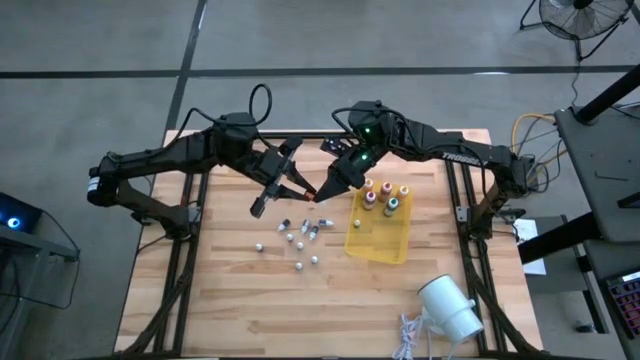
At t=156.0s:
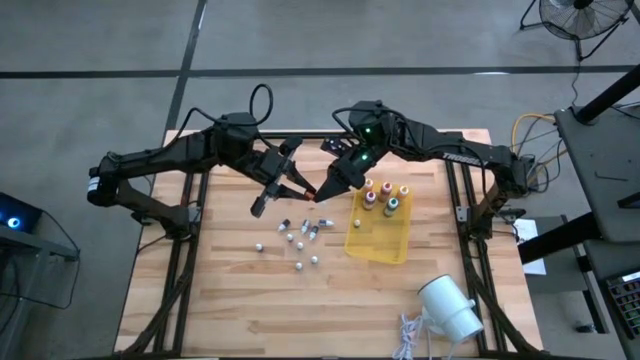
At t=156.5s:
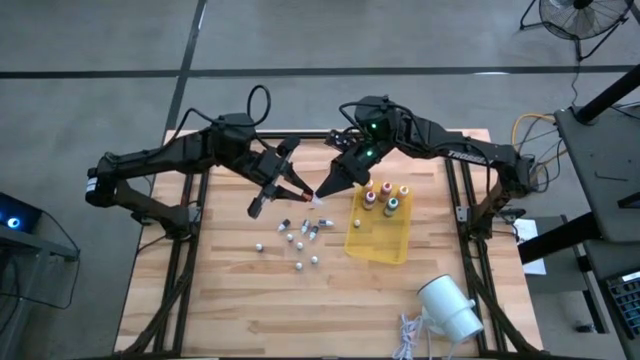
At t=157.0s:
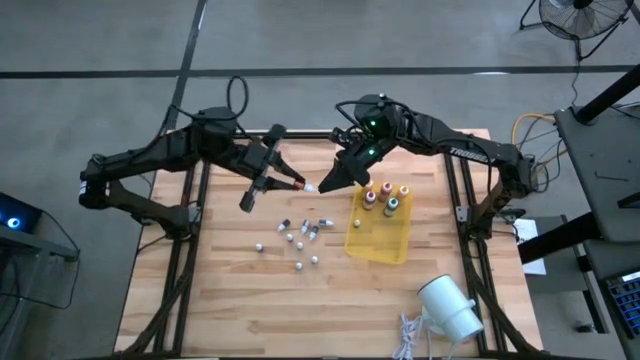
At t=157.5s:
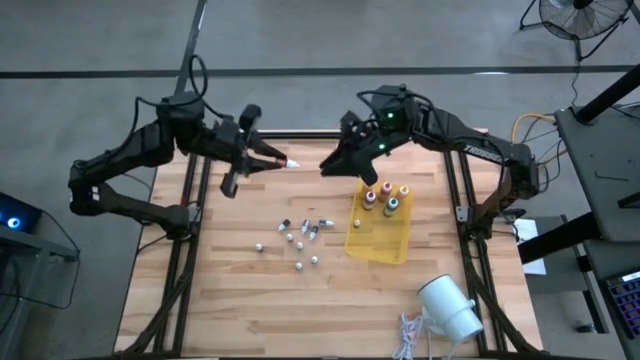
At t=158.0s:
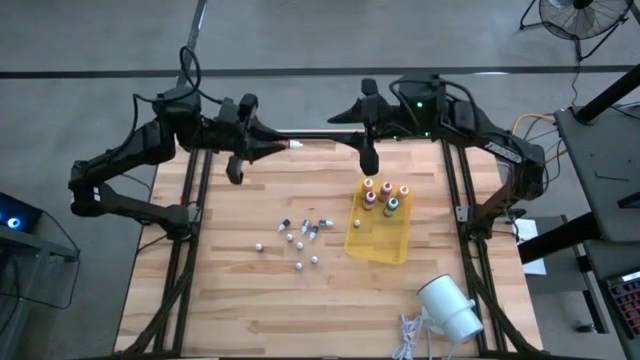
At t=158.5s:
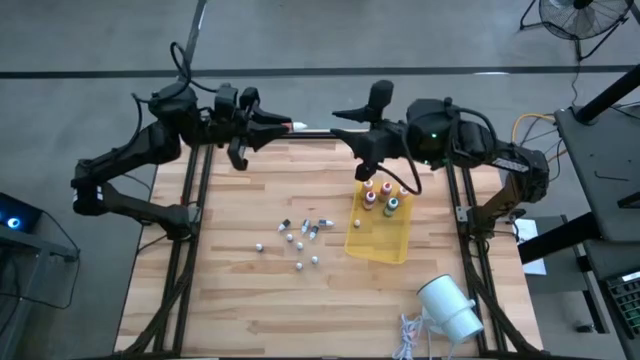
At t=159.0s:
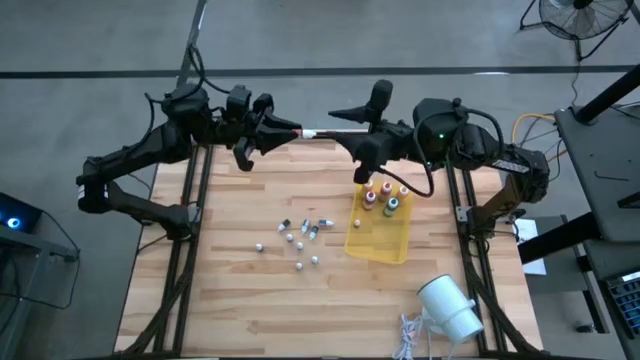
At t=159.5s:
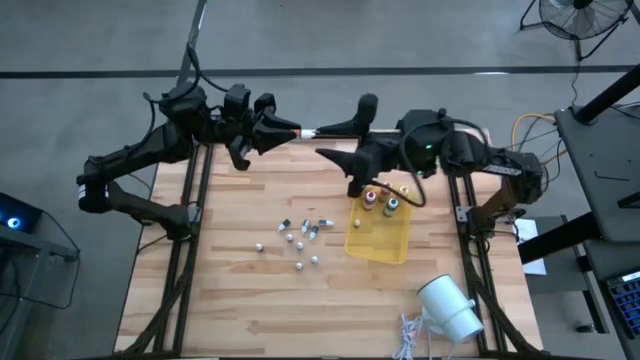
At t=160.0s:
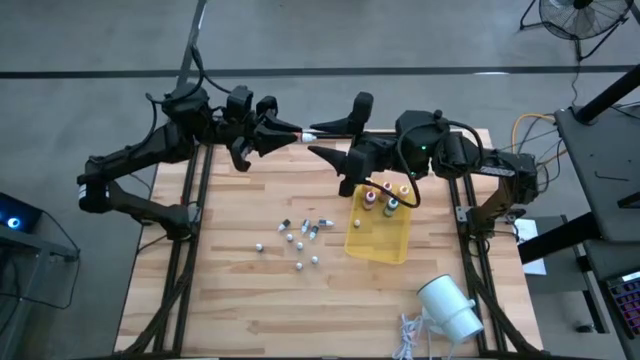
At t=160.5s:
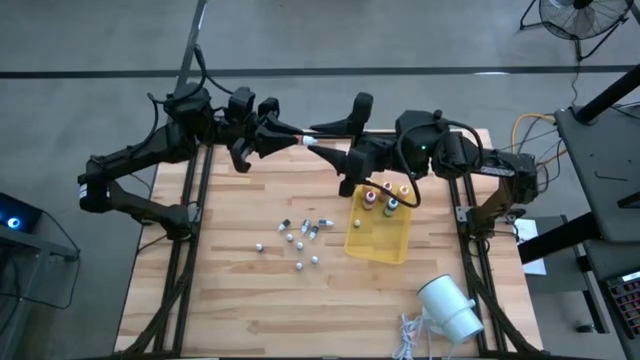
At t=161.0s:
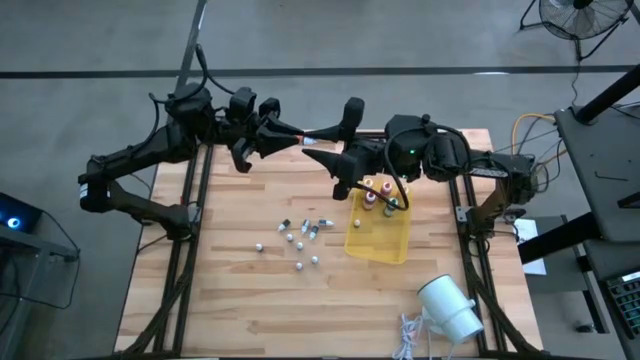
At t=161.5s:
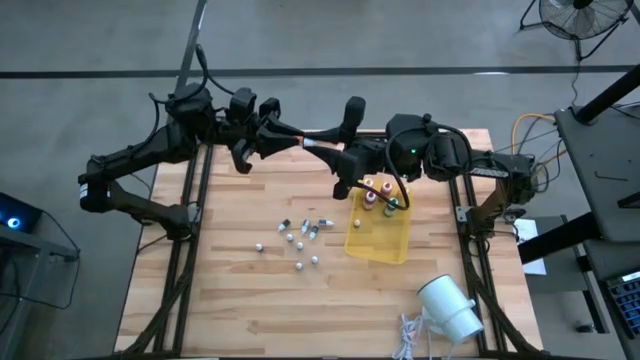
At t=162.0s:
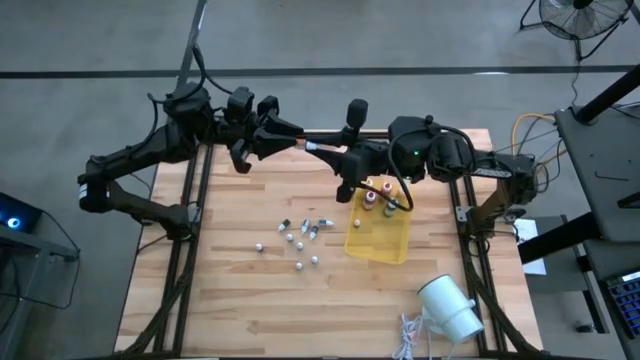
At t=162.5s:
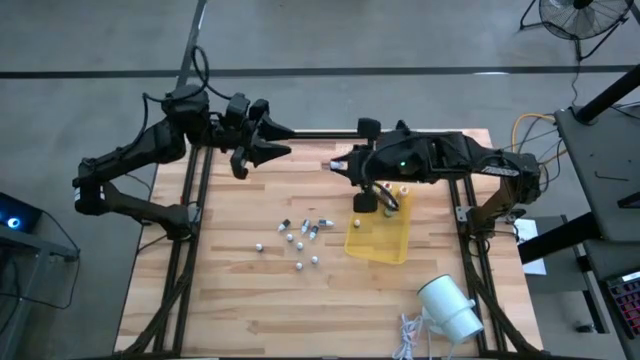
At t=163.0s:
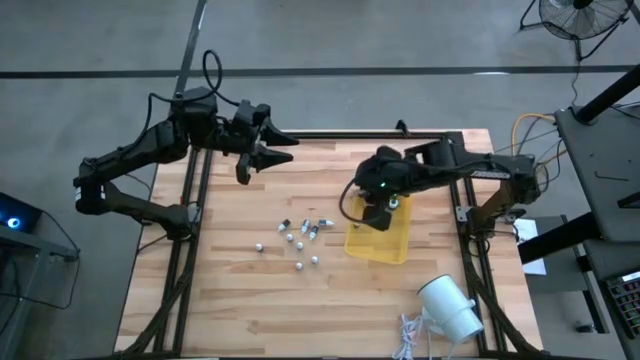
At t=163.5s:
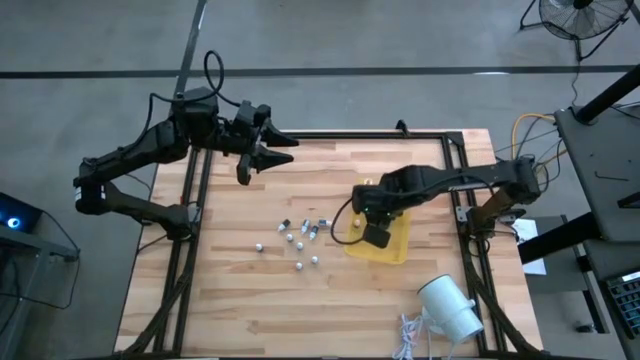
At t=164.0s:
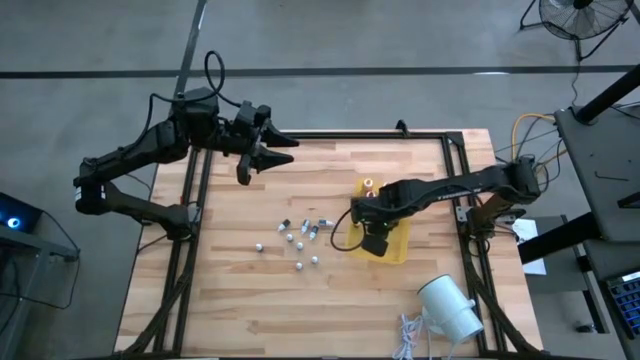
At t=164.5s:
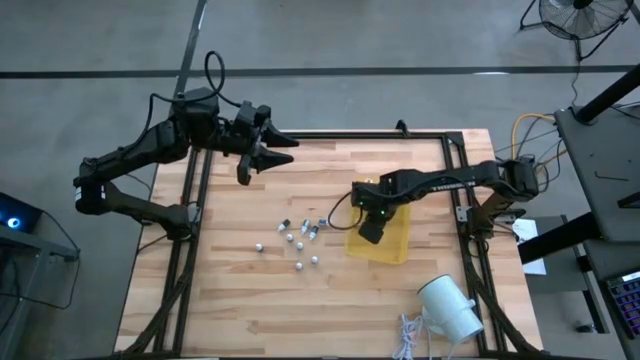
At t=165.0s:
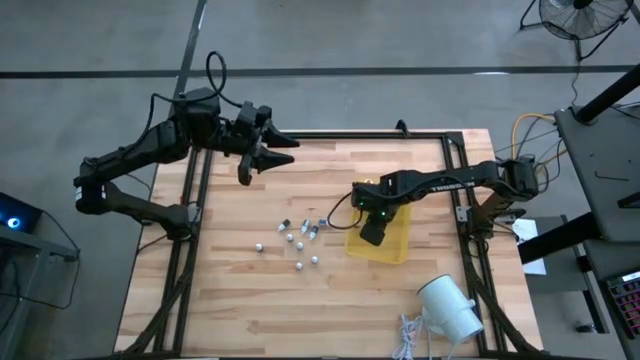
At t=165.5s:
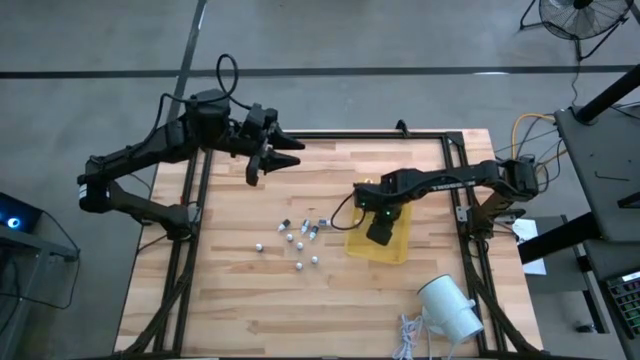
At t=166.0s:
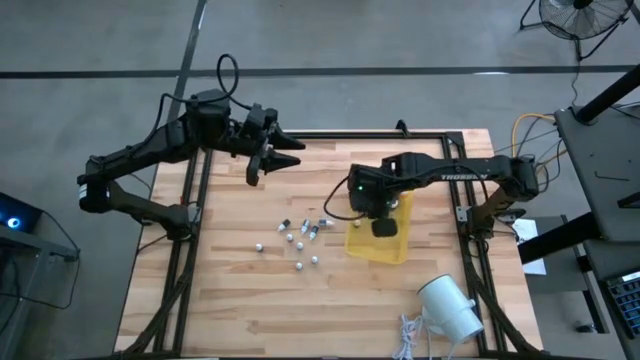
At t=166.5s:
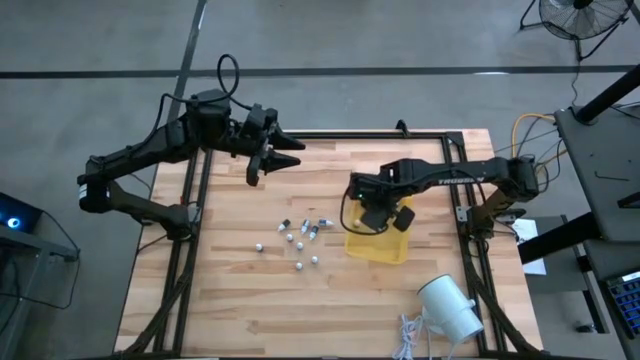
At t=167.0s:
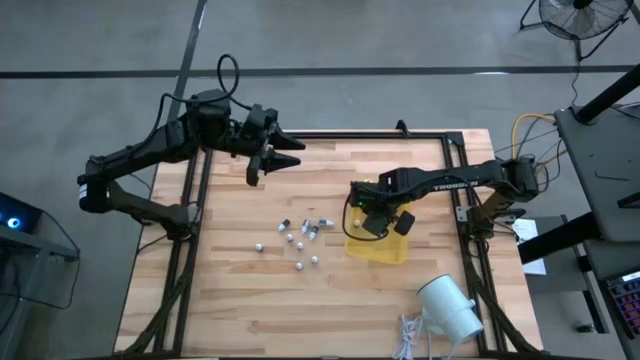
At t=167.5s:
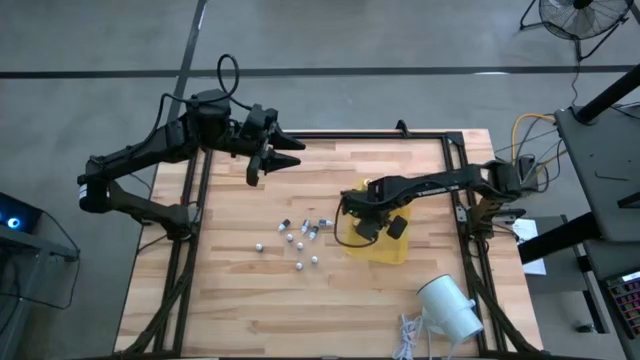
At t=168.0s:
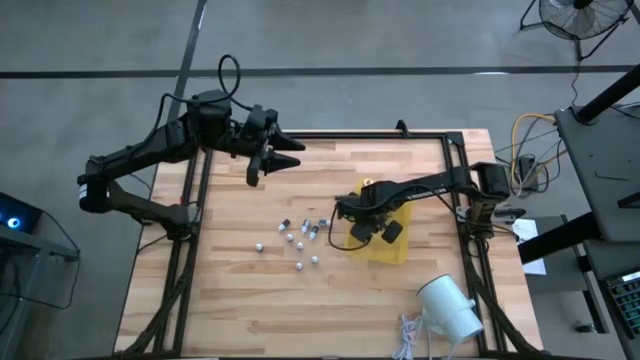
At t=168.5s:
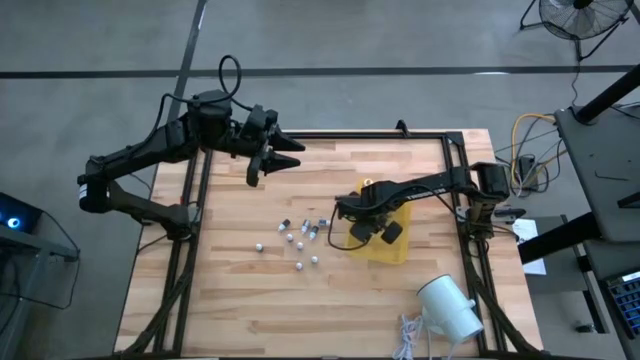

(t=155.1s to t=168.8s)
Task: Pick & Place food coloring
Put the small orange food coloring bottle into the yellow bin

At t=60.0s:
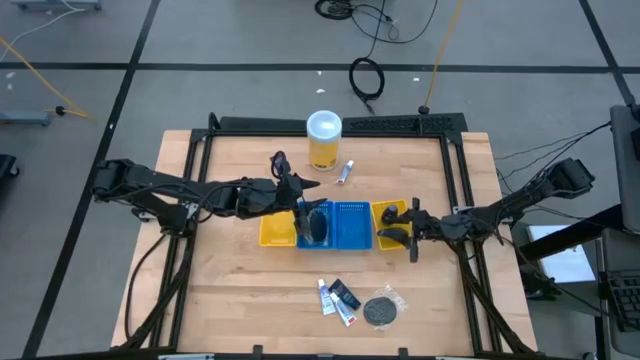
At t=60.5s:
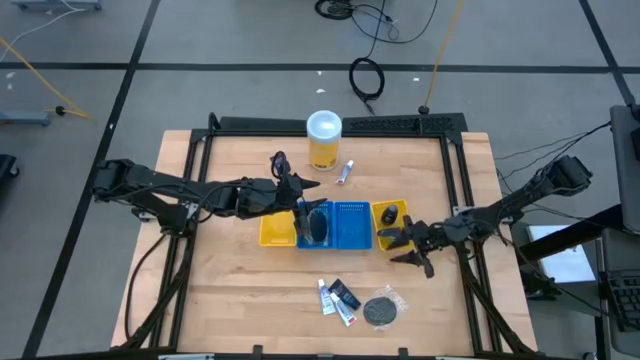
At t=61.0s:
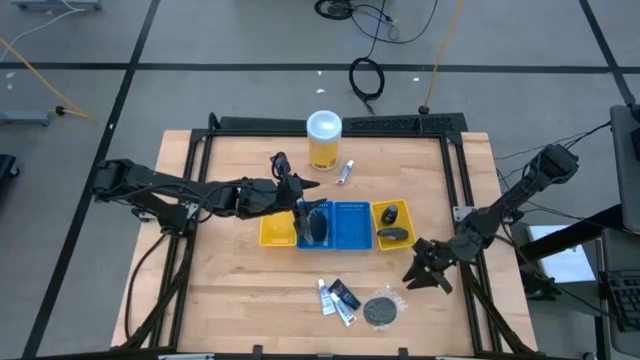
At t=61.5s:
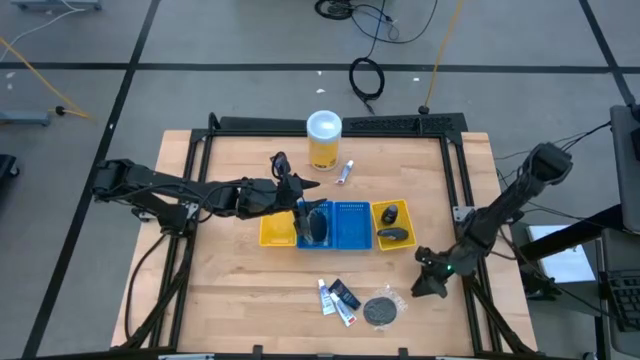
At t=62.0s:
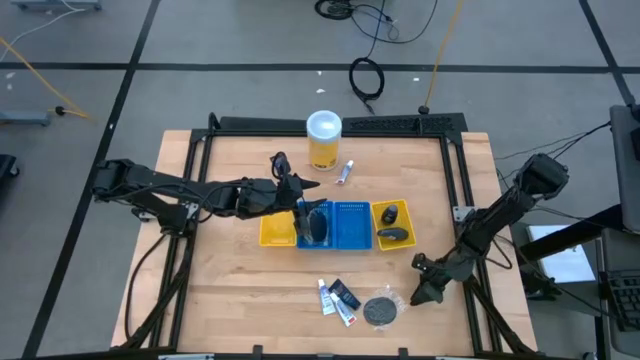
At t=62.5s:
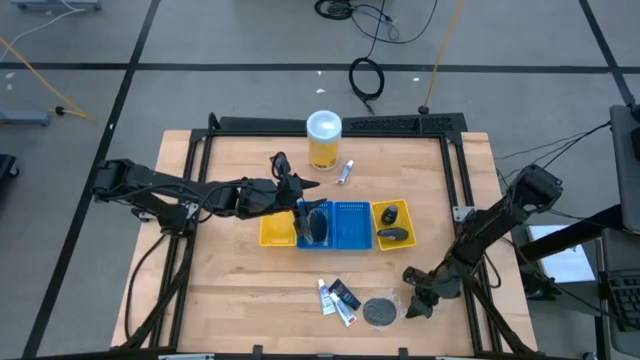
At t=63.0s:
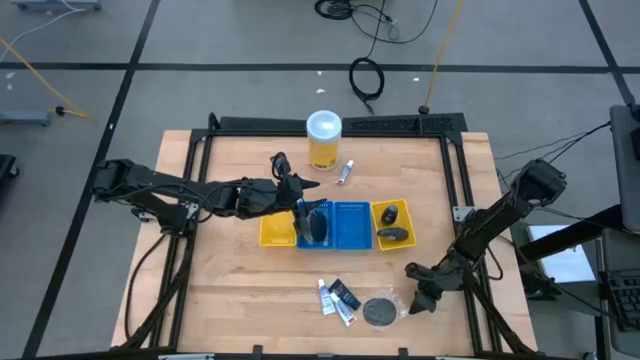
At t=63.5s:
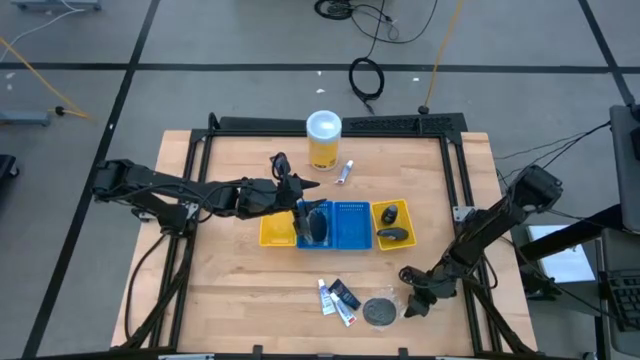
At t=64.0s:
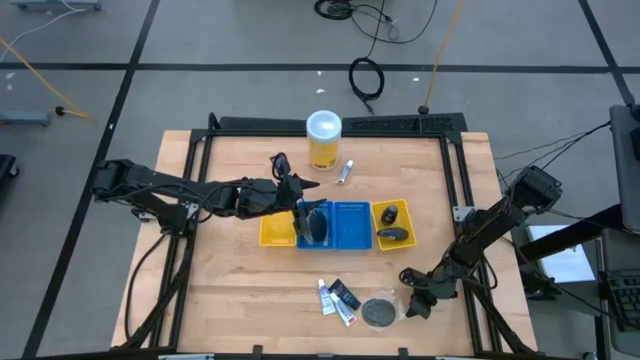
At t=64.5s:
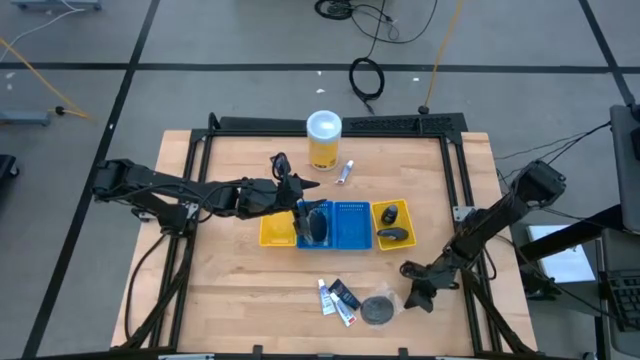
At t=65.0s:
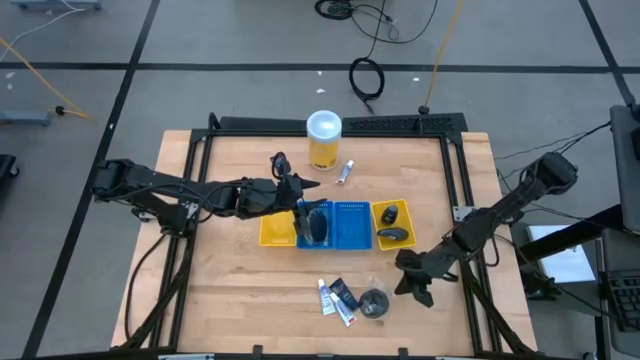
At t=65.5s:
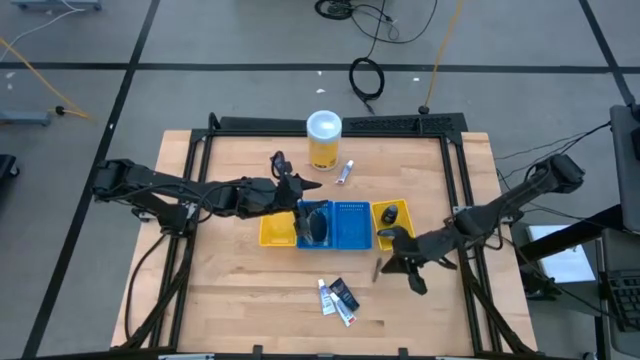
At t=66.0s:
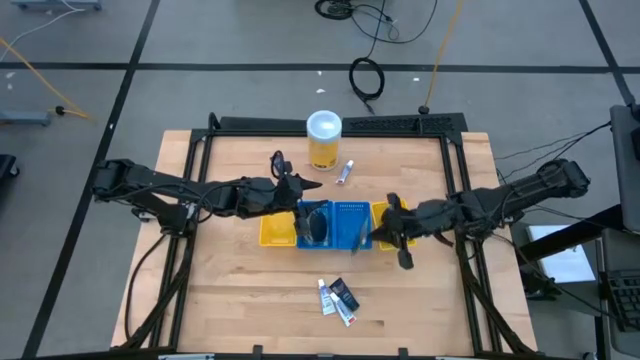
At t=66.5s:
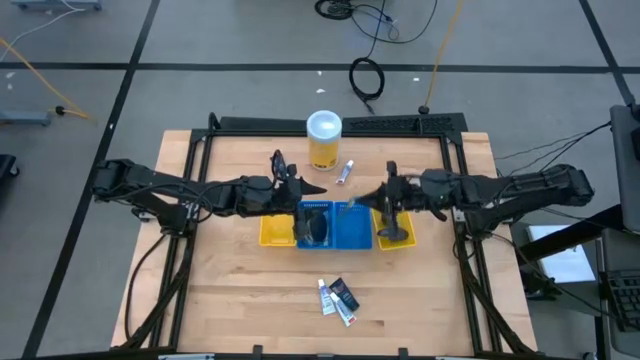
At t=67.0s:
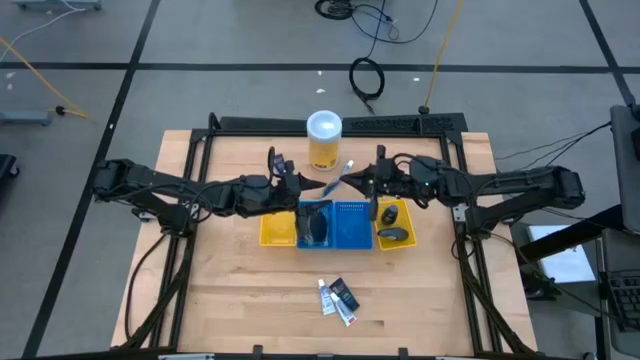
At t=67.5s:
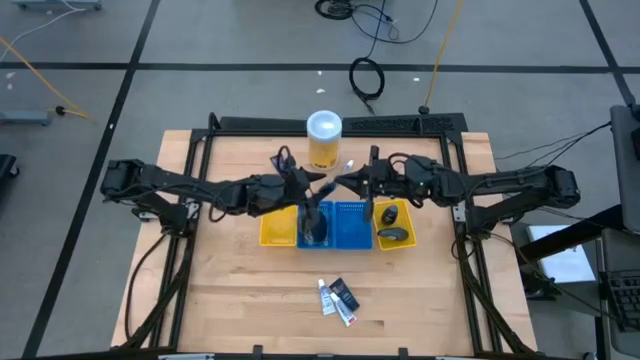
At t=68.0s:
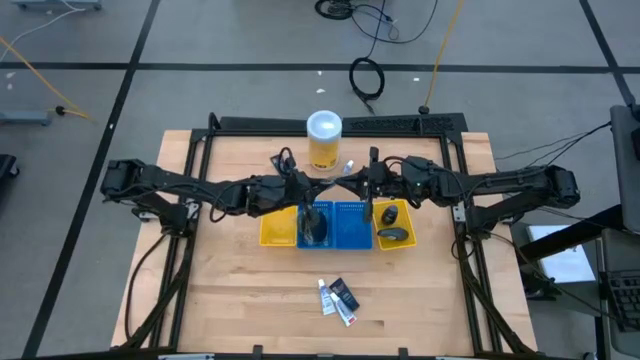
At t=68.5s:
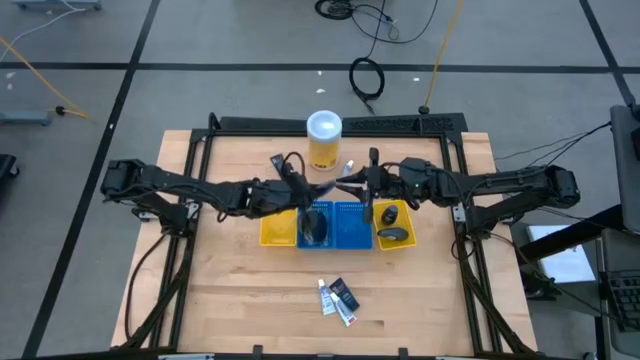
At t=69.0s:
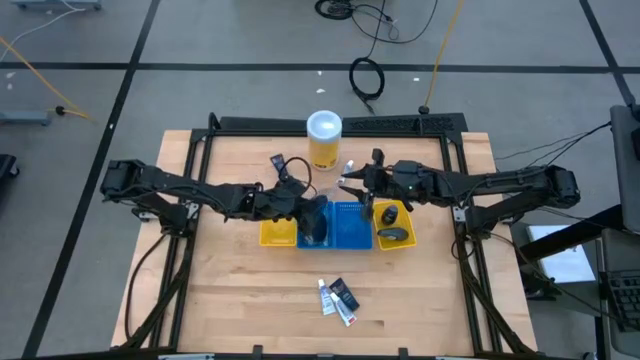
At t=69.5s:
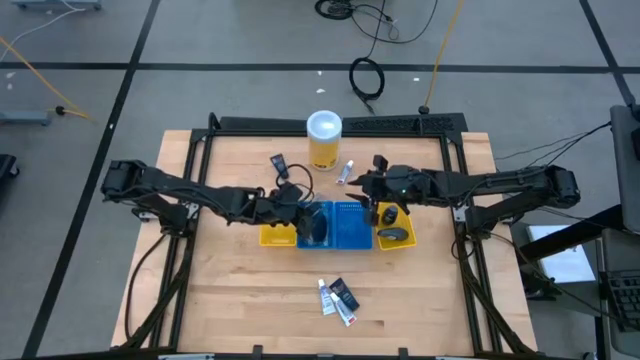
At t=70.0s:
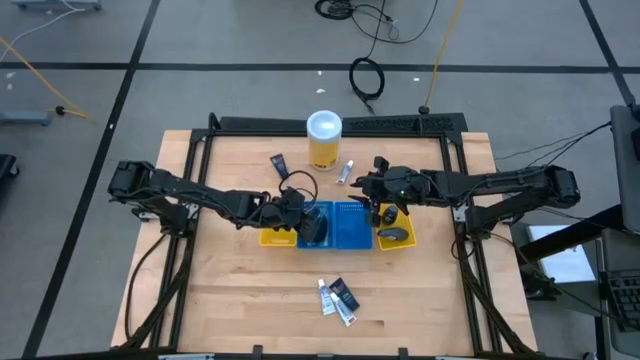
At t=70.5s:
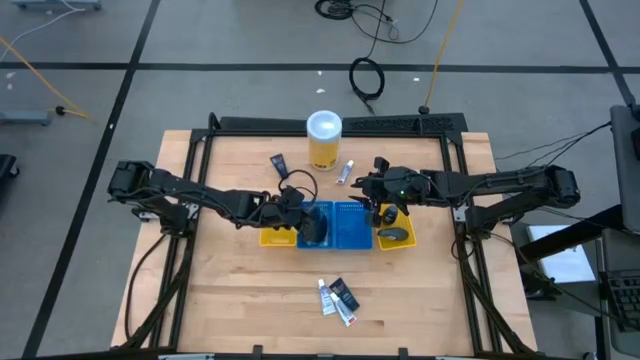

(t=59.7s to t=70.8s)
Task: Pick & Place Travel size toiletries
Put the black comb into the left blue bin
